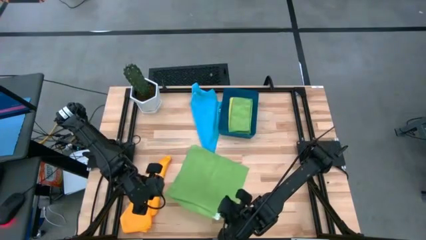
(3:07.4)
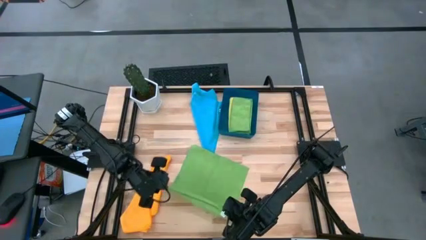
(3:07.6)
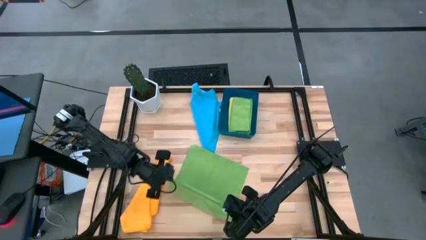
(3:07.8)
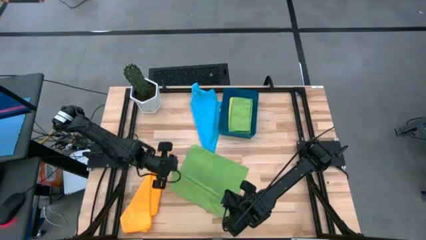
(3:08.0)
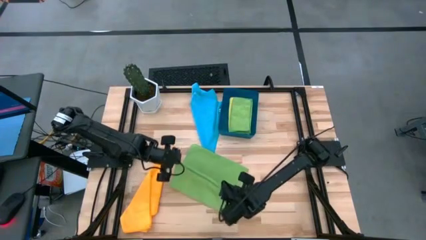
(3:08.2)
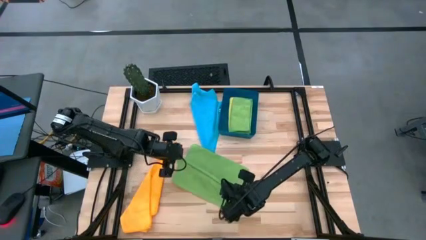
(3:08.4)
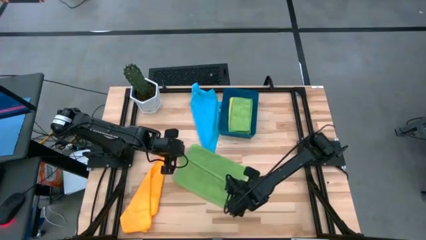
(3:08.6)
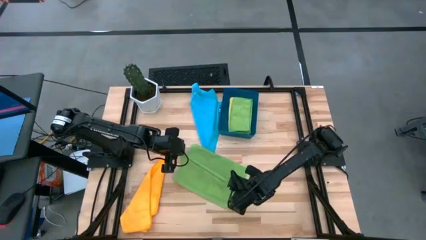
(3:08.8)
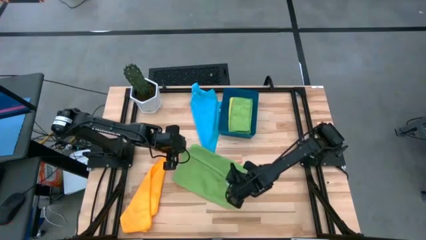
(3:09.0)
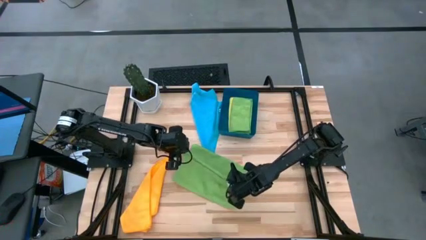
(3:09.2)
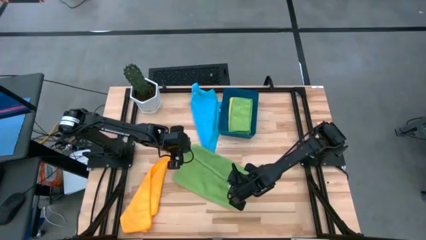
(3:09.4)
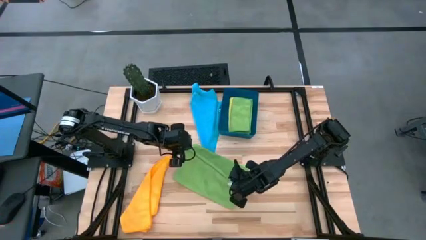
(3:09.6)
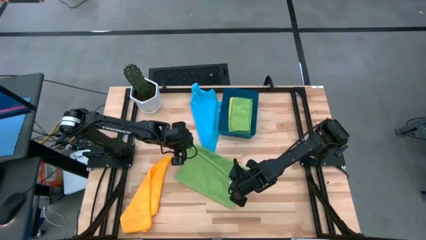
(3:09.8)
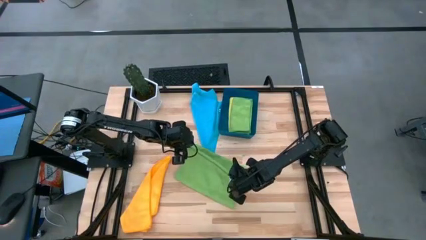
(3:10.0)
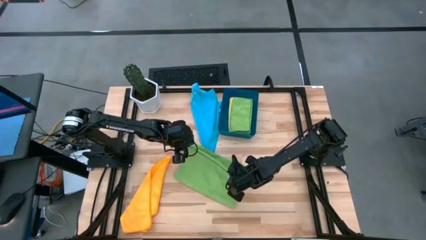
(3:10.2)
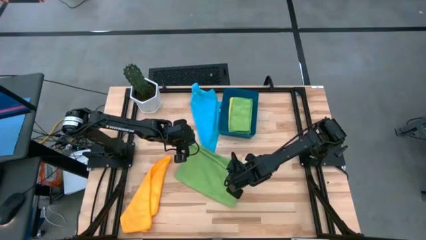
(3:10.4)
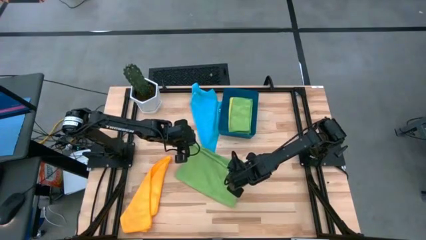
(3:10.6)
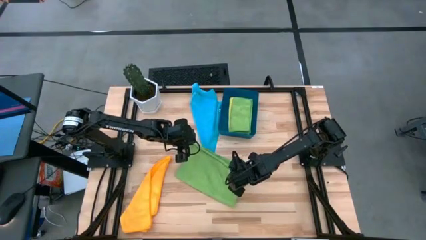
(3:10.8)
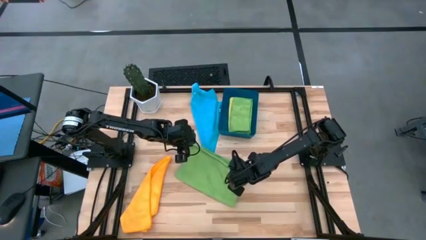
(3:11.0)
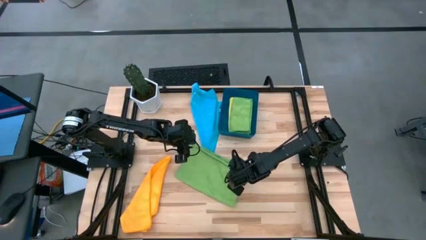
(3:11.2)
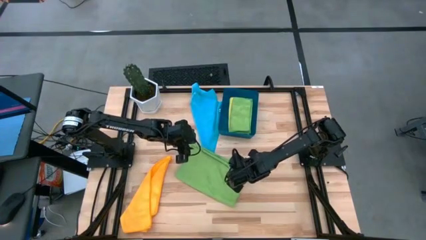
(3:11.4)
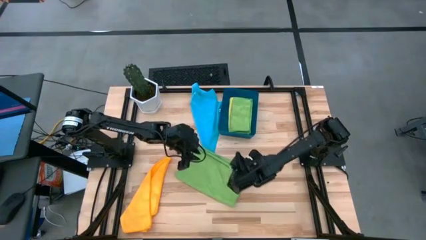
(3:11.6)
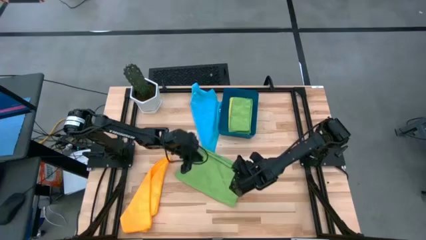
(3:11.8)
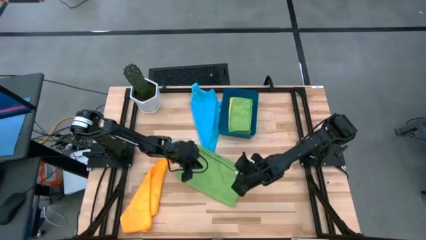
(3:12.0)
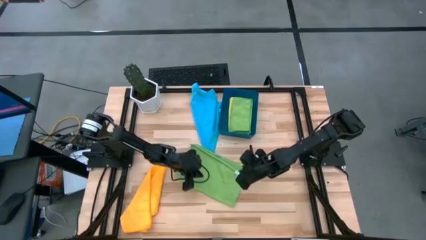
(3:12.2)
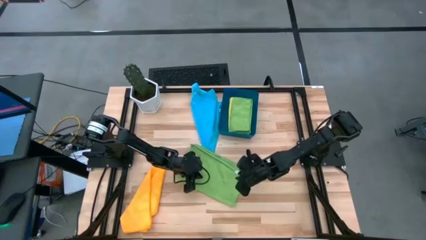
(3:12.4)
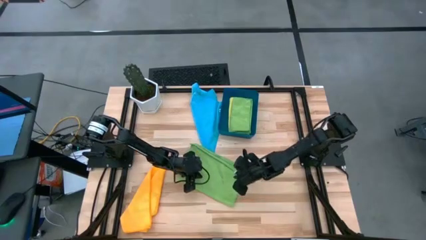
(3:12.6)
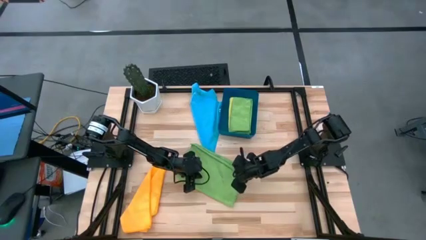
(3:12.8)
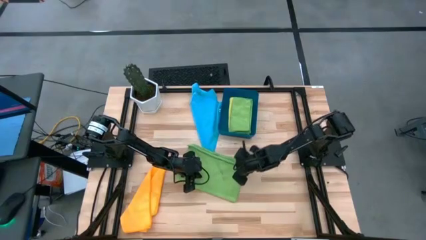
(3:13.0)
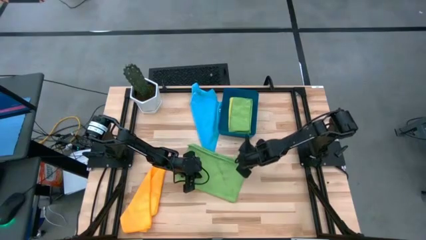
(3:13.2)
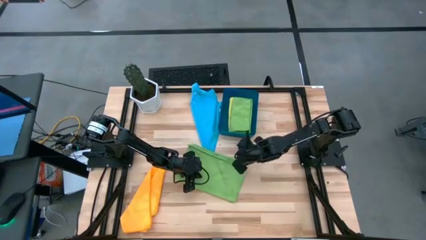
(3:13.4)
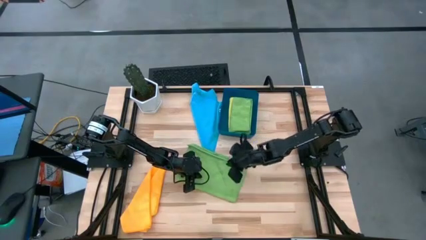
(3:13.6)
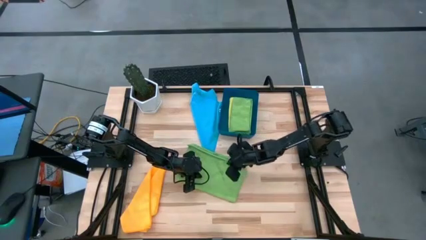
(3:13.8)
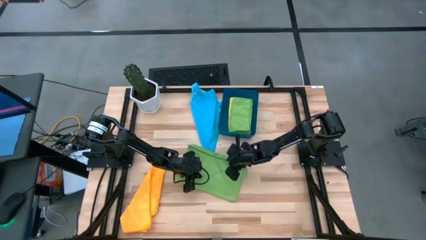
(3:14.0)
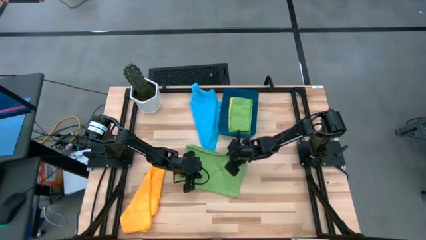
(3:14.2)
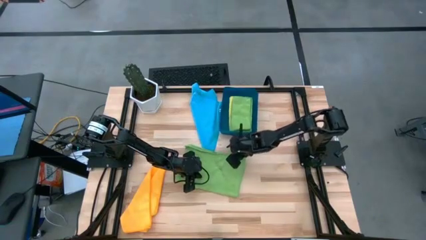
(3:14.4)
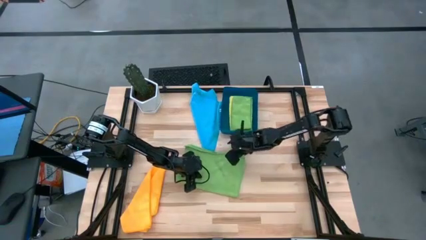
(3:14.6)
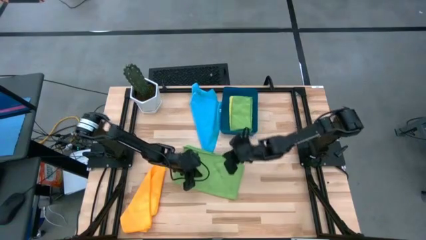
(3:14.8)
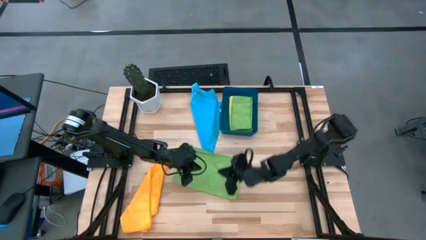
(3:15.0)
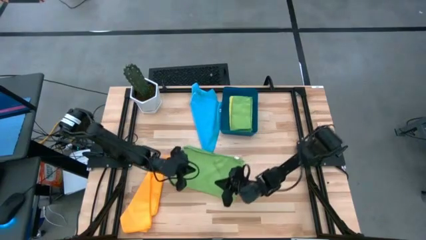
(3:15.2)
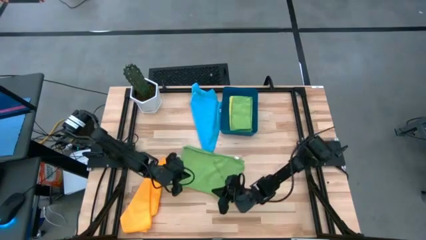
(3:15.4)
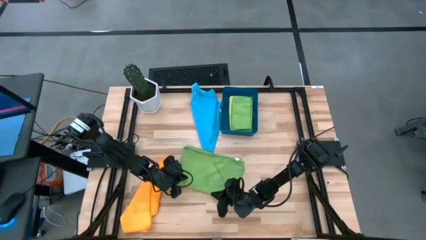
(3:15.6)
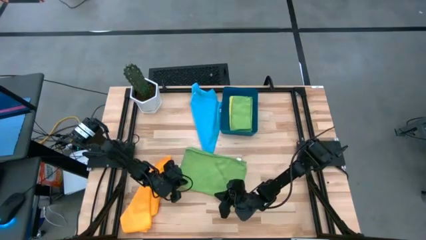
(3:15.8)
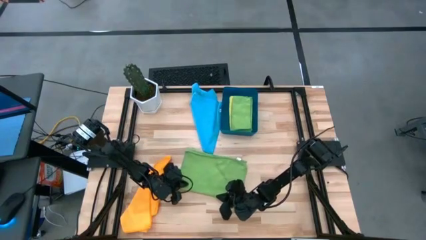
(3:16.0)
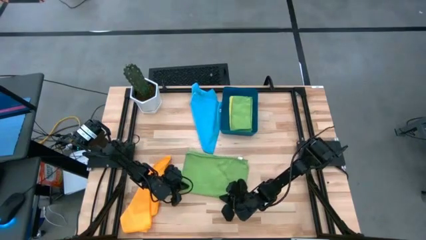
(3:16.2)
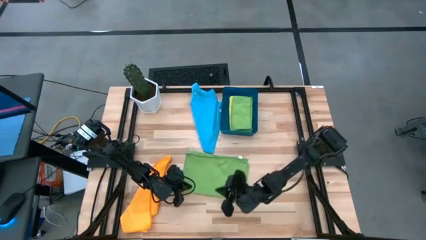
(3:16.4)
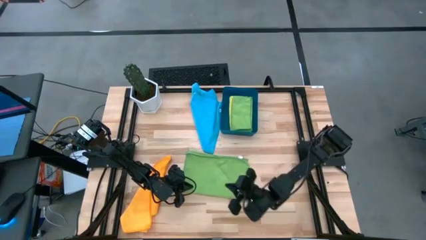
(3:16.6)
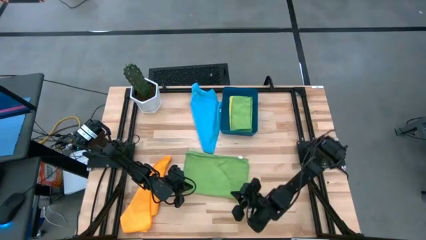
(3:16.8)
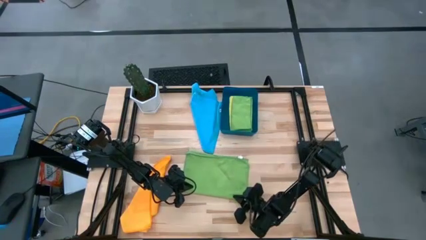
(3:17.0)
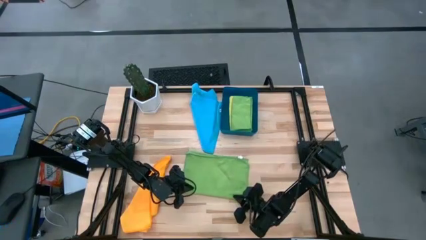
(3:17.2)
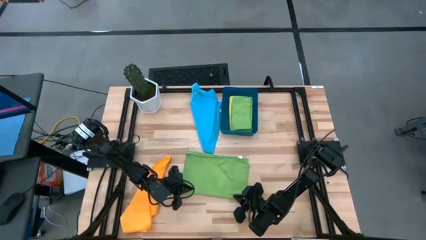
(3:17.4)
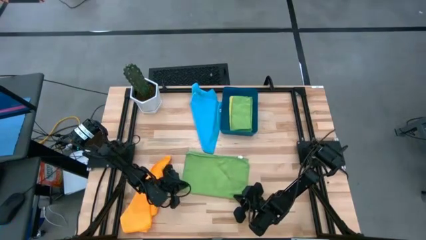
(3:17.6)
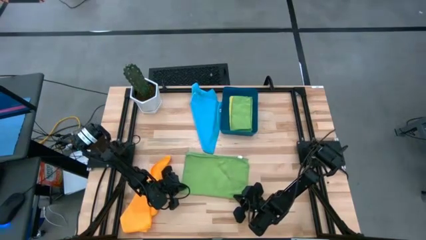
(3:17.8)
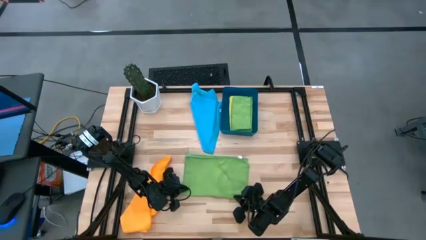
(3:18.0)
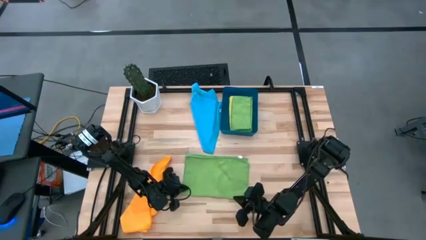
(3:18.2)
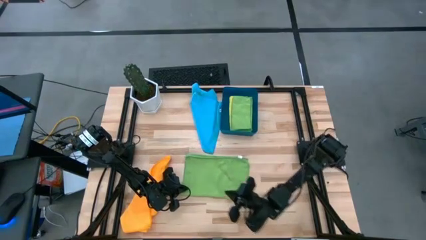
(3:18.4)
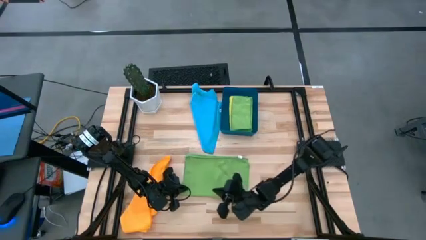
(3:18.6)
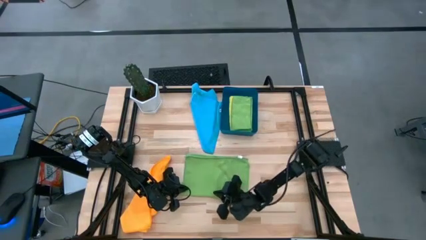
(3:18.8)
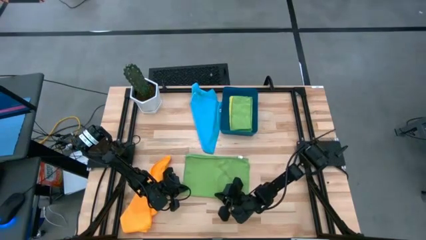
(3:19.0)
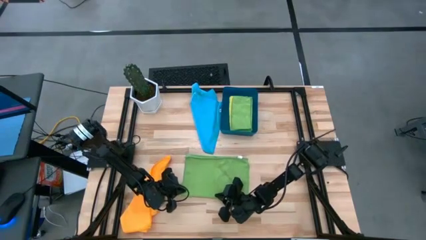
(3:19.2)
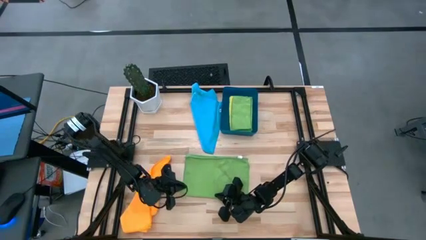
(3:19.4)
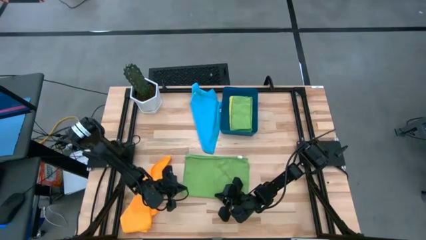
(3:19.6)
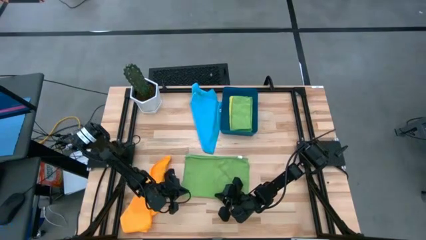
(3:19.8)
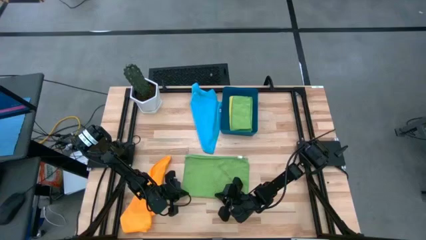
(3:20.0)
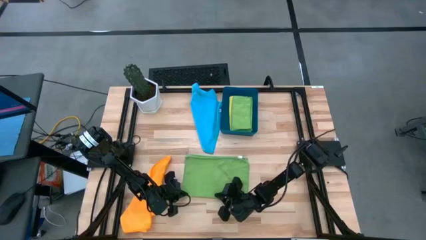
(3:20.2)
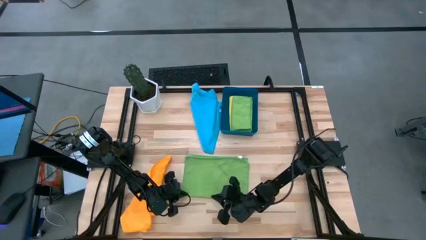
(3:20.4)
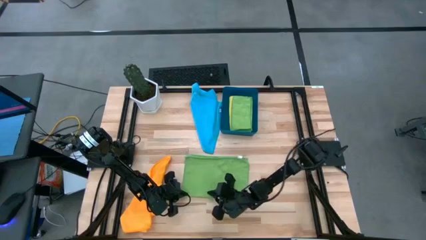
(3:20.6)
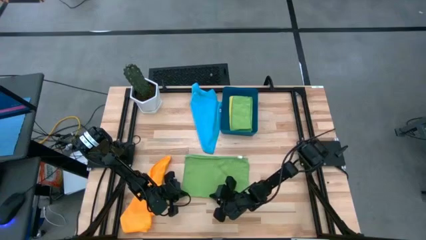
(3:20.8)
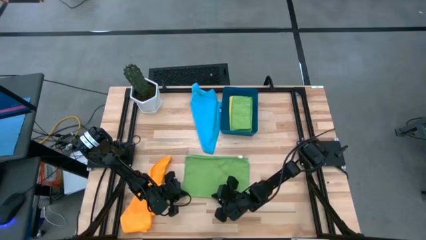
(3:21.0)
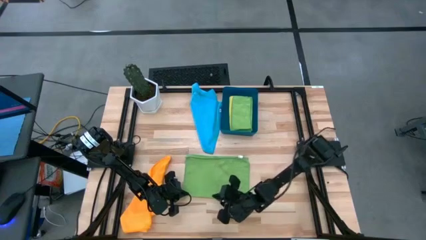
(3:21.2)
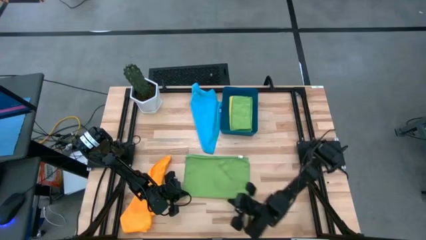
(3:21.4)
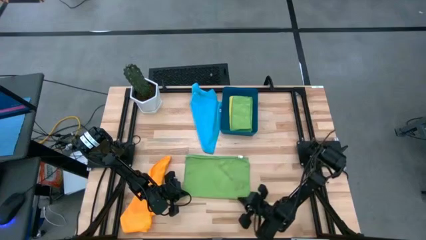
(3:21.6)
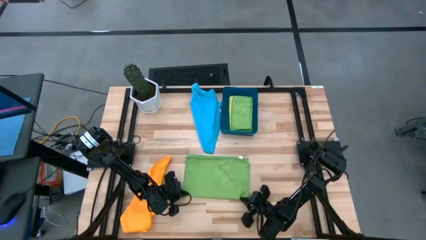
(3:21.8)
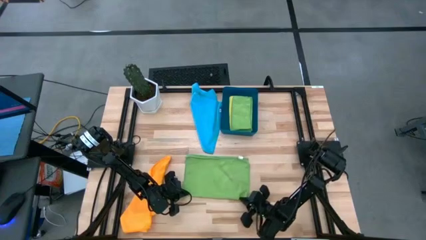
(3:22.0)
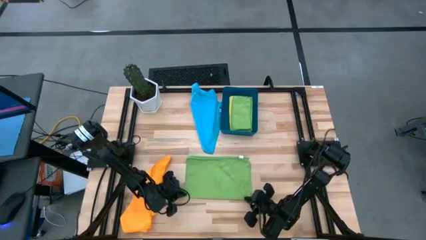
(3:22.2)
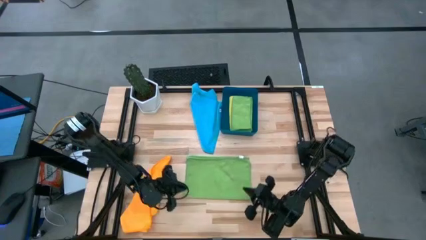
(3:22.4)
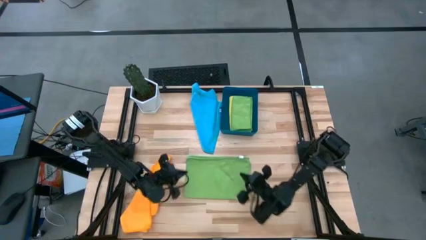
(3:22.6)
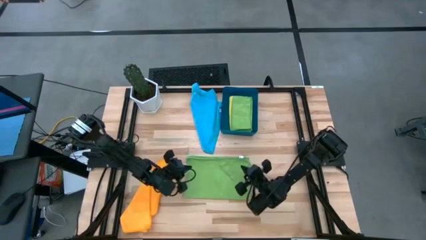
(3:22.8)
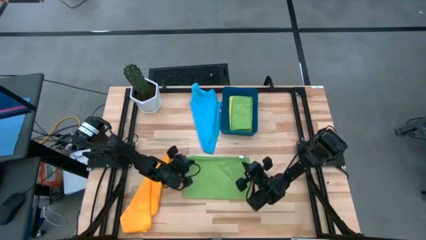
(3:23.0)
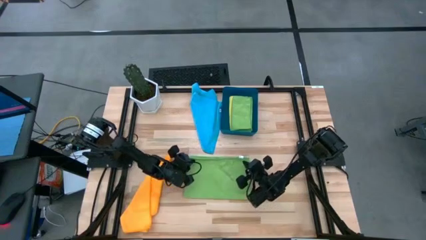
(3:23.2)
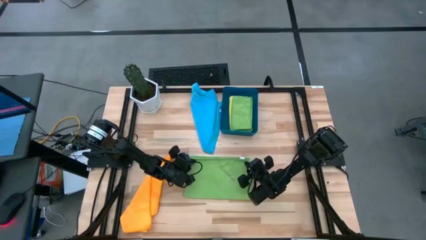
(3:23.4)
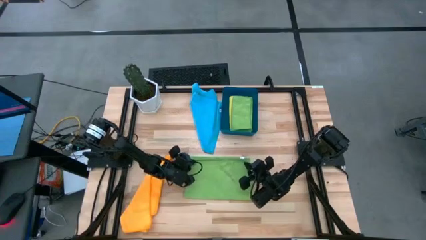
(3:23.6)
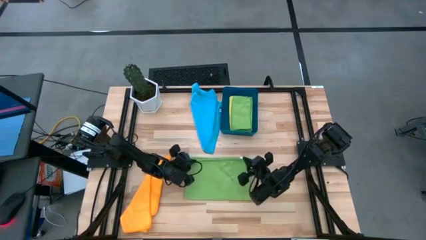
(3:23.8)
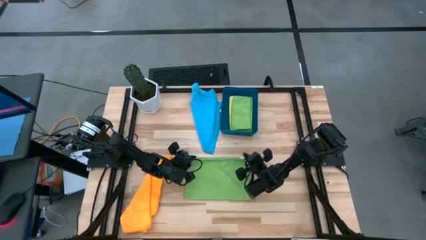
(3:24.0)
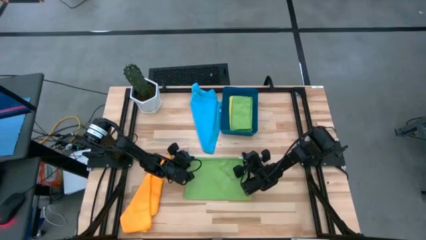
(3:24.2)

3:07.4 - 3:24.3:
Task: Fold microfiber towels
Fold the green towel
